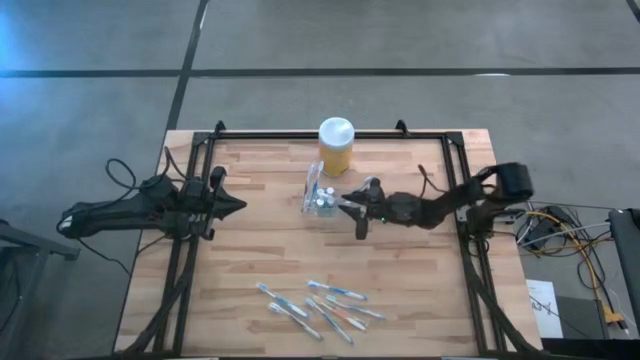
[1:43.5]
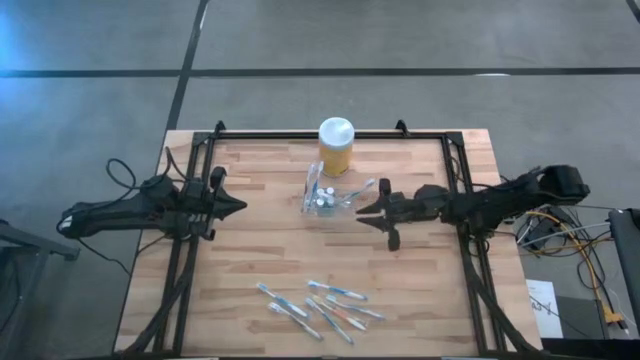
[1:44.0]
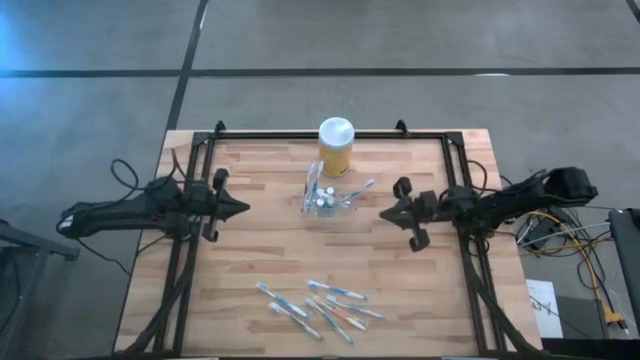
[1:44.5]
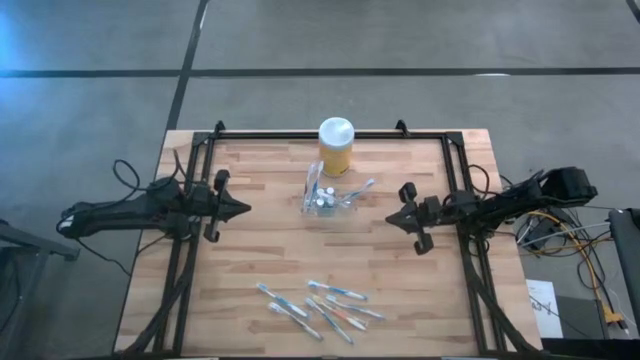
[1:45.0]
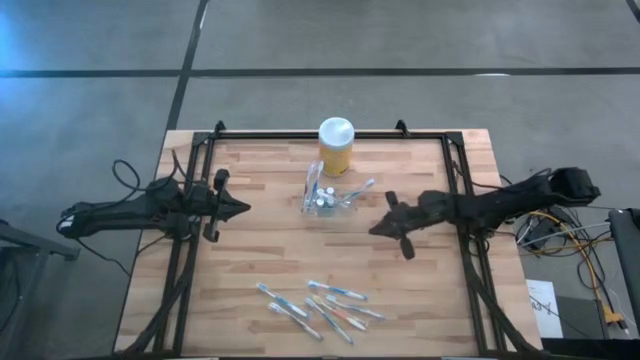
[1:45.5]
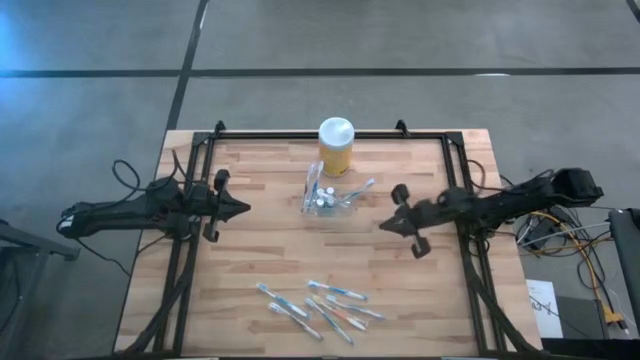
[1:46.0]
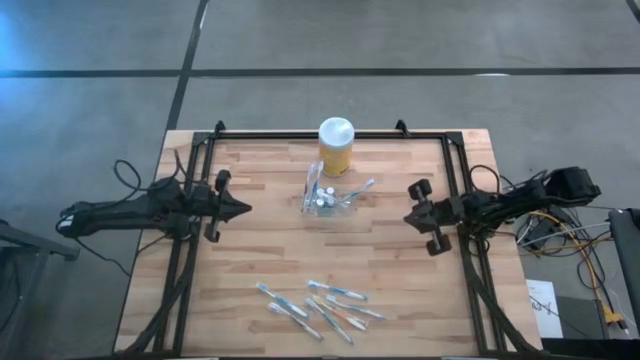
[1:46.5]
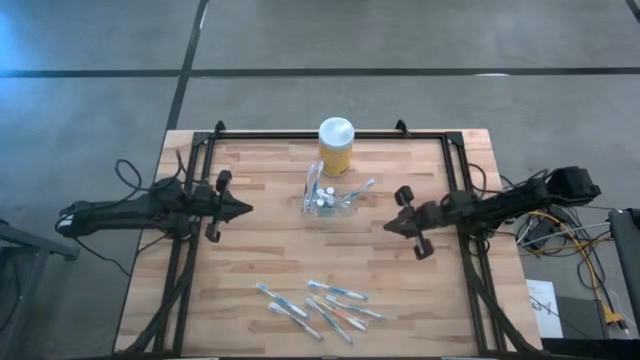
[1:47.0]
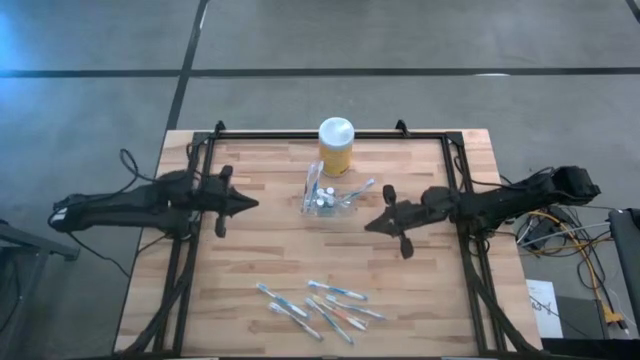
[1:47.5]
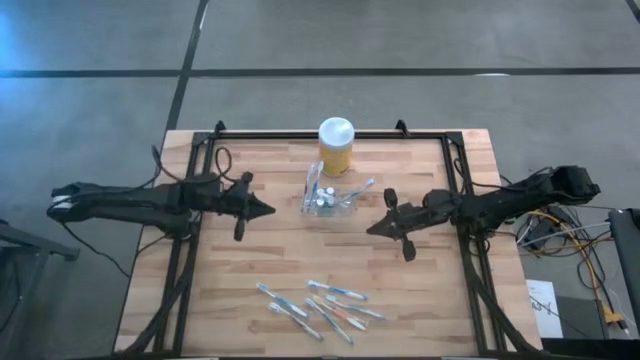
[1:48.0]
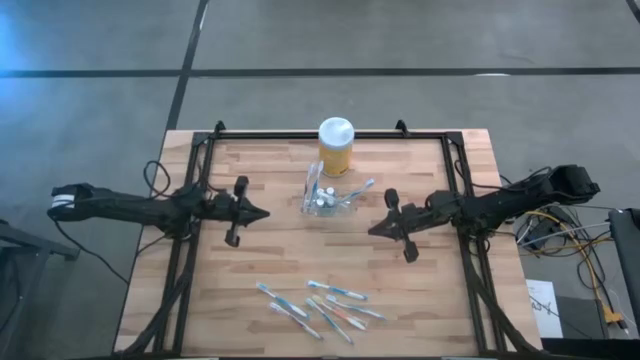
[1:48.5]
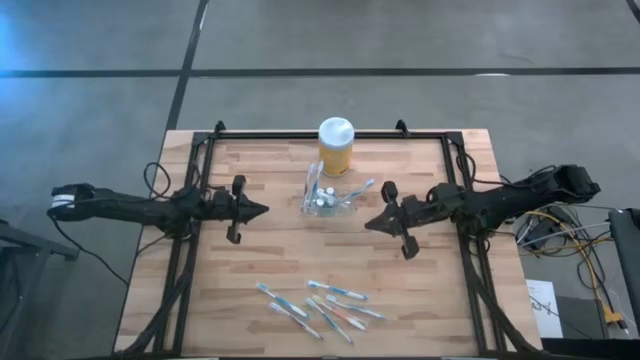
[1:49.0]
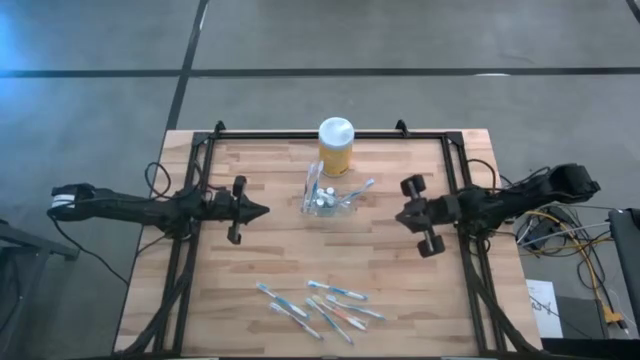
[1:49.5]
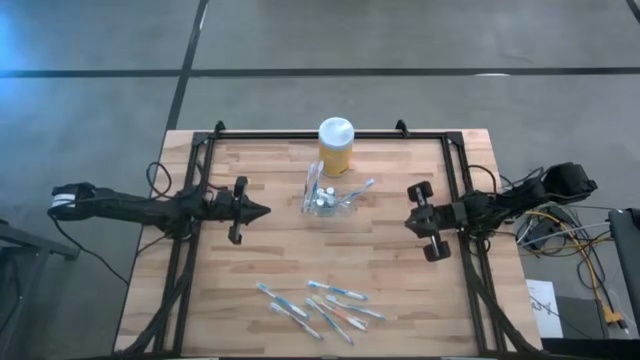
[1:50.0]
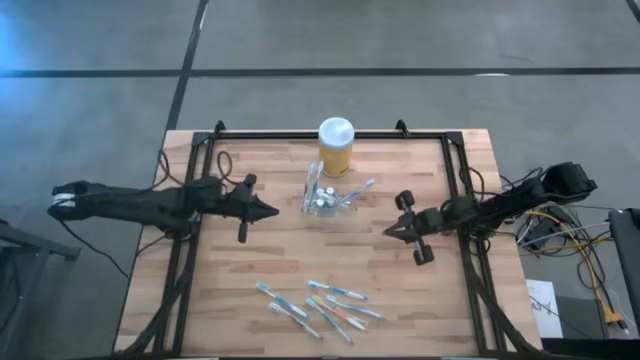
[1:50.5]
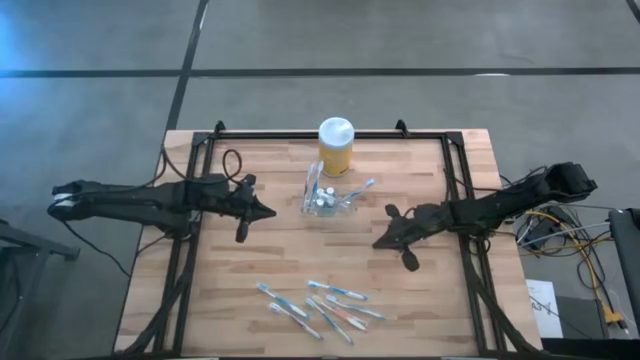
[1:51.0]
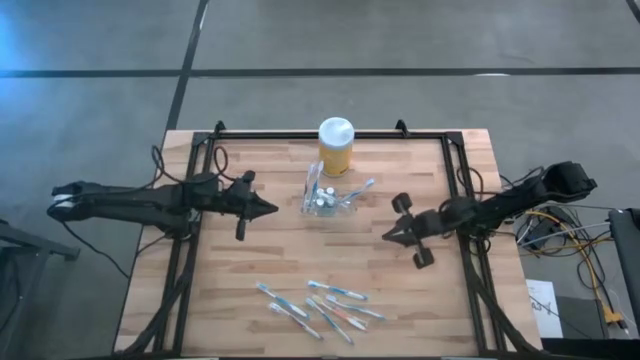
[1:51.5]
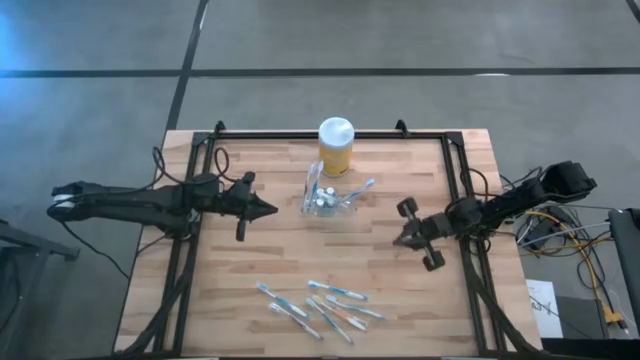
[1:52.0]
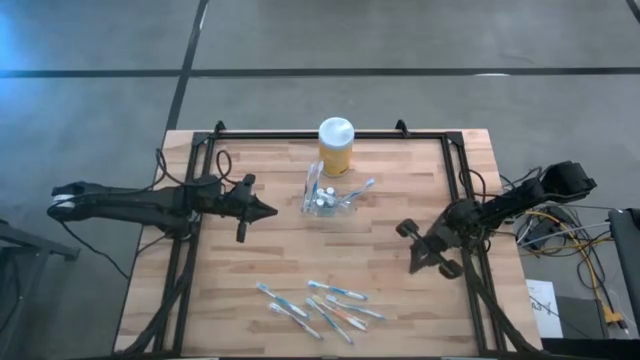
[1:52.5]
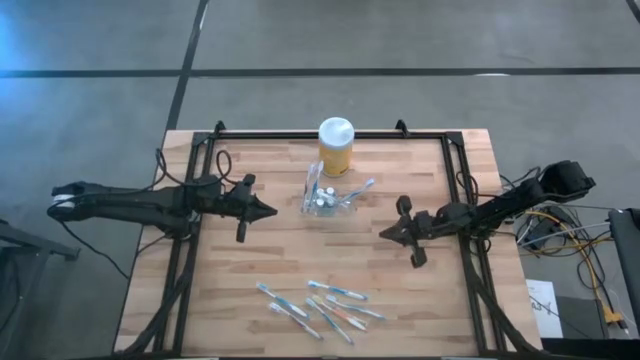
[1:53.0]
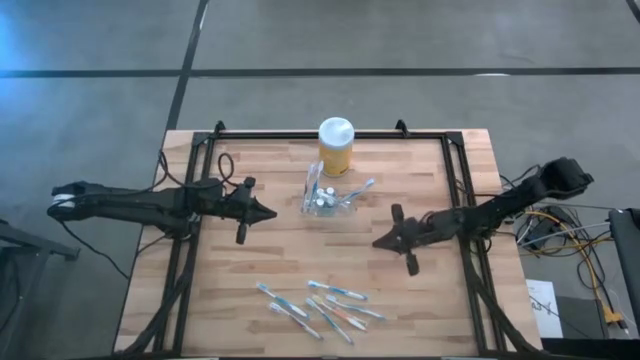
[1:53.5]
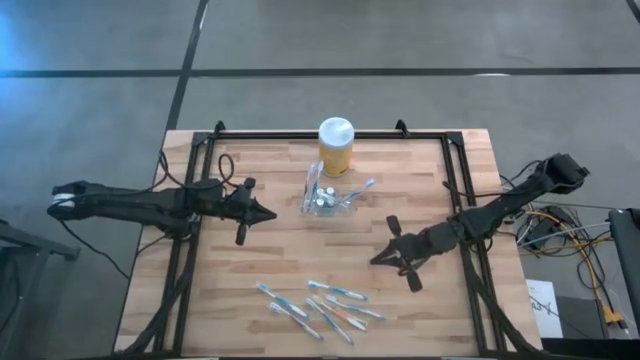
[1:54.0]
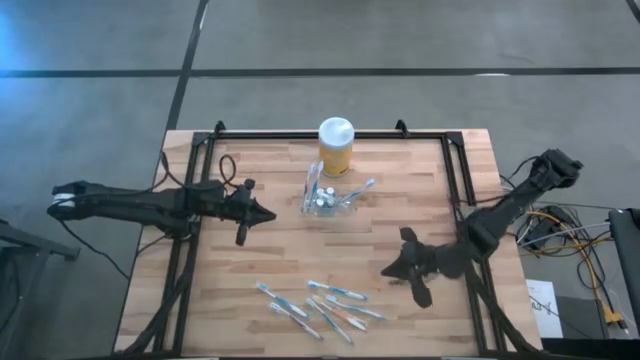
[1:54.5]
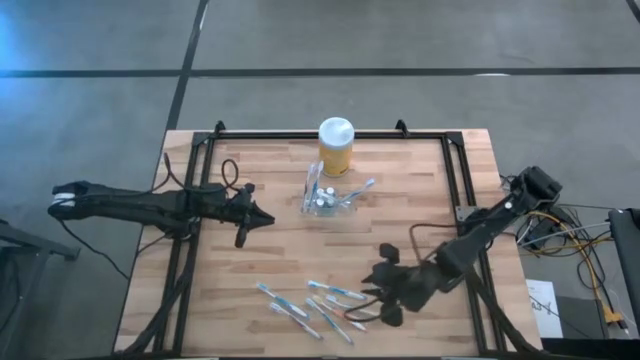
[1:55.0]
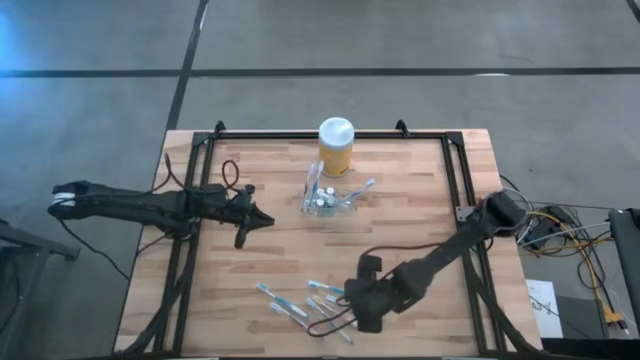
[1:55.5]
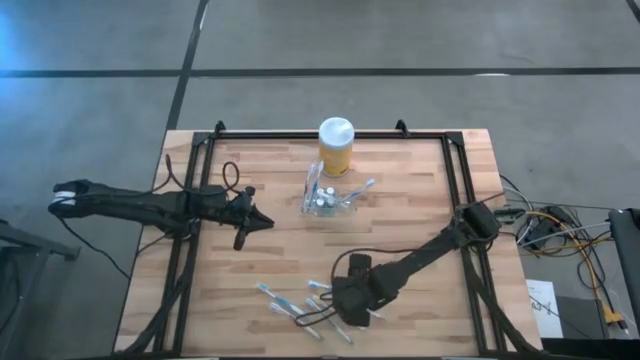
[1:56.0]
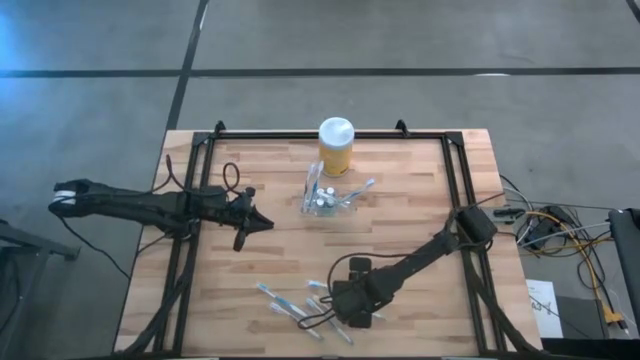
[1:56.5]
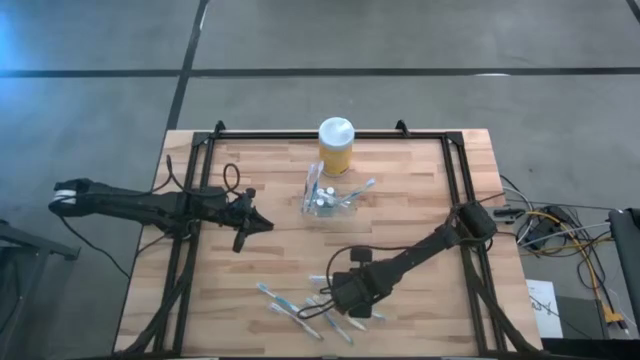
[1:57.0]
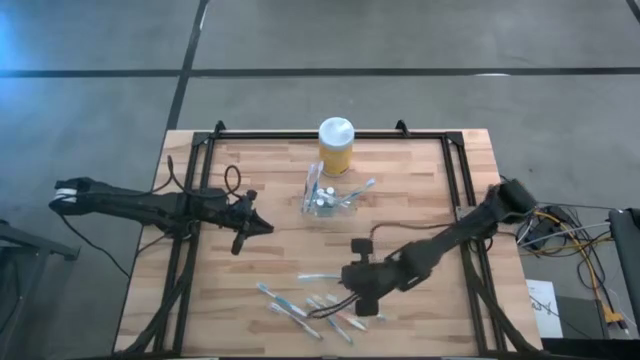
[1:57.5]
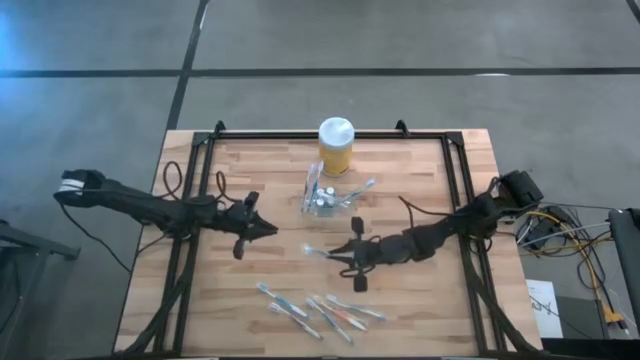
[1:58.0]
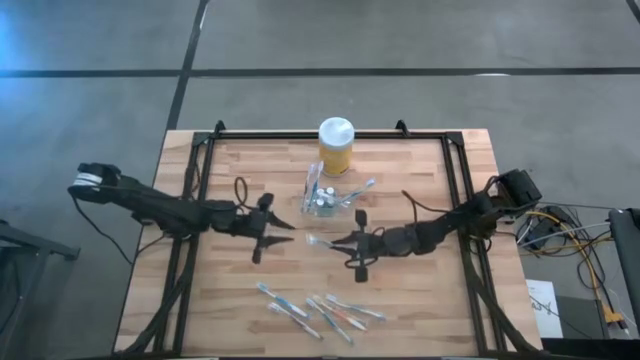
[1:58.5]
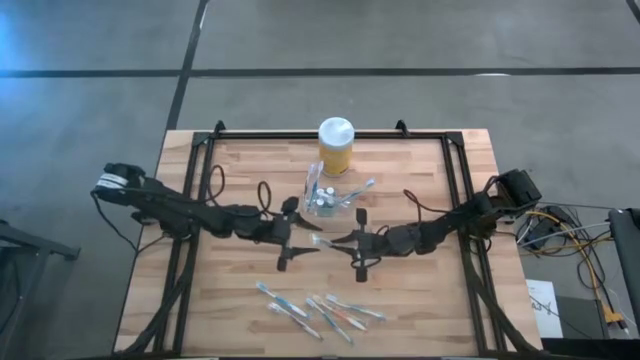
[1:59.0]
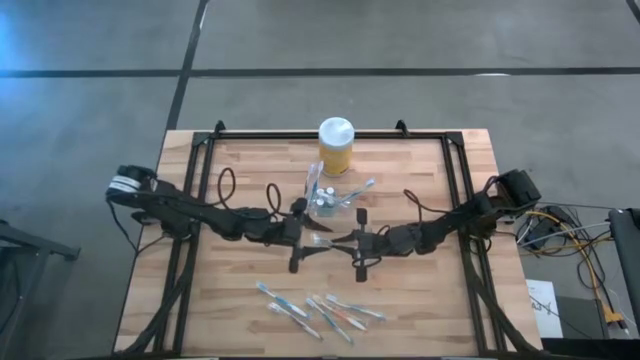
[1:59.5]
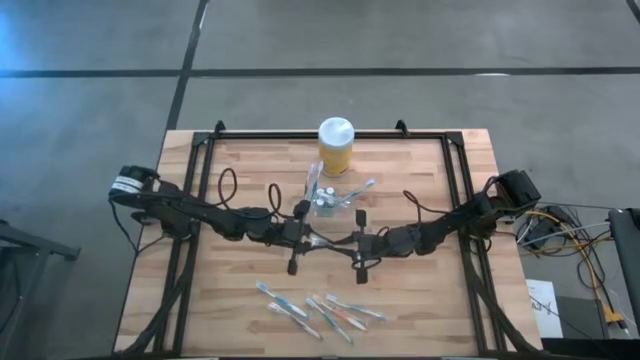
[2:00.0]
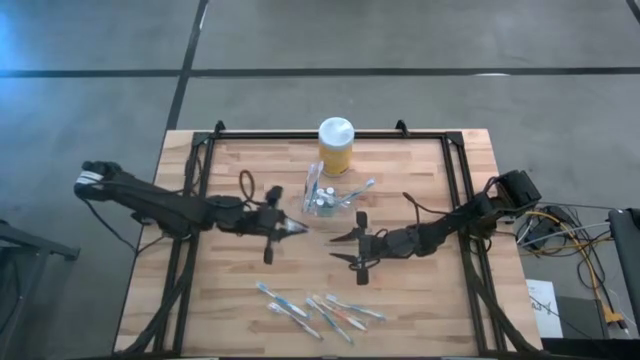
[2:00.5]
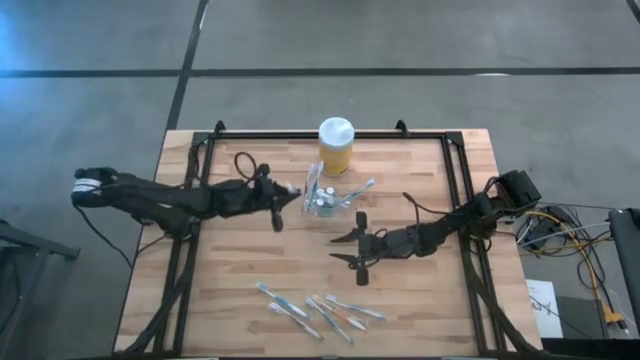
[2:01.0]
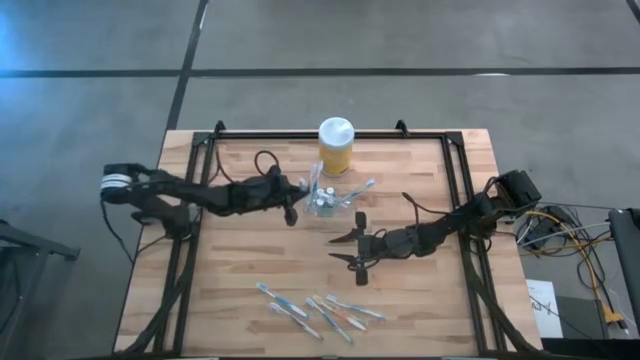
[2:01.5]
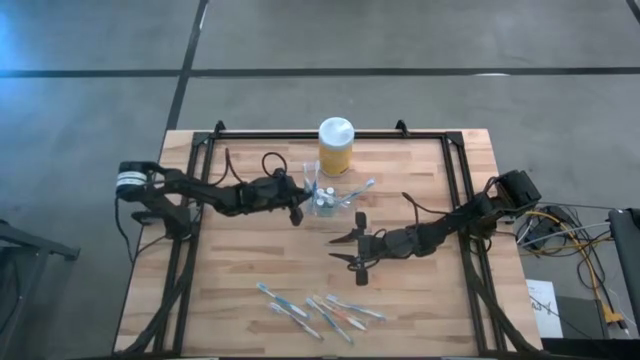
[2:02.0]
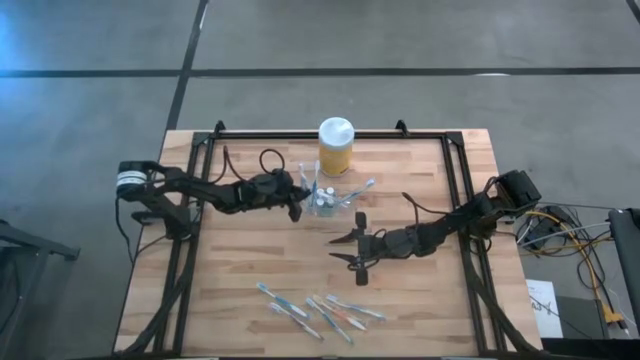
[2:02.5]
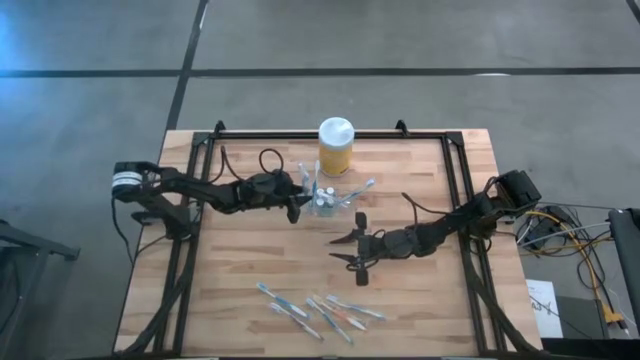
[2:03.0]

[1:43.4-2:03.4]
Task: Pick & Place toothbrushing station
Put the blue toothbrush into the transparent organizer

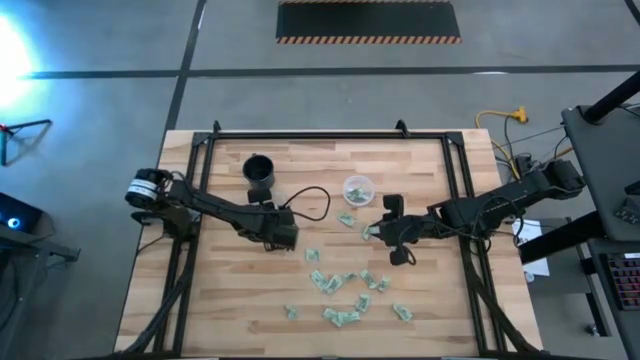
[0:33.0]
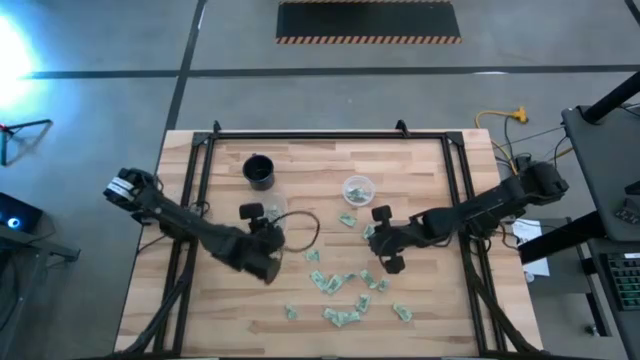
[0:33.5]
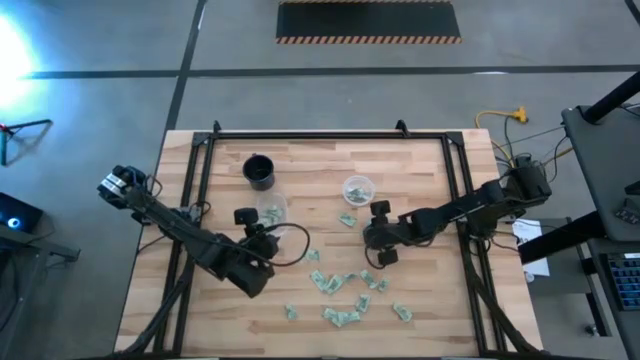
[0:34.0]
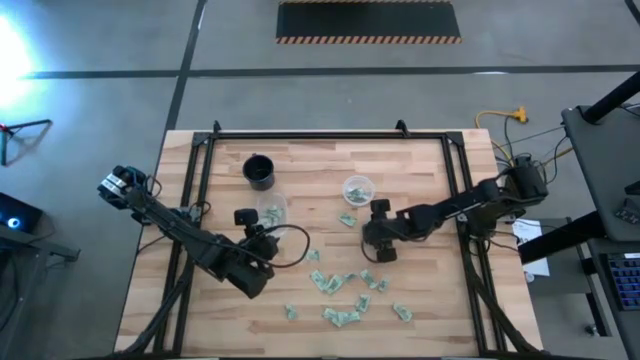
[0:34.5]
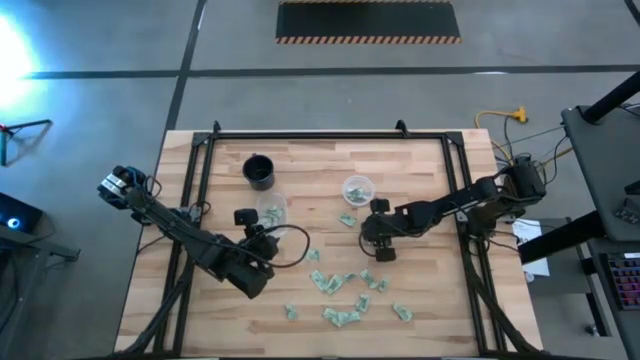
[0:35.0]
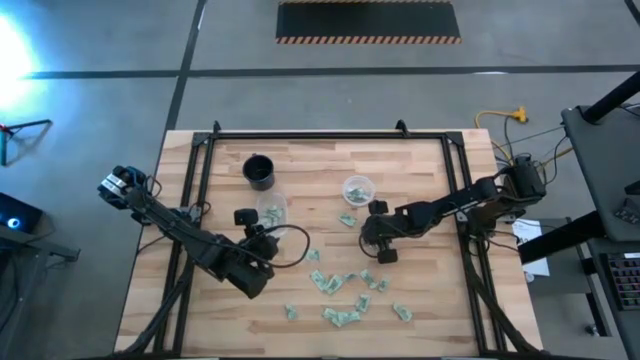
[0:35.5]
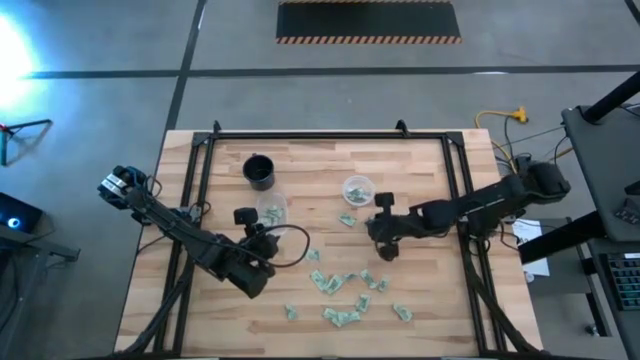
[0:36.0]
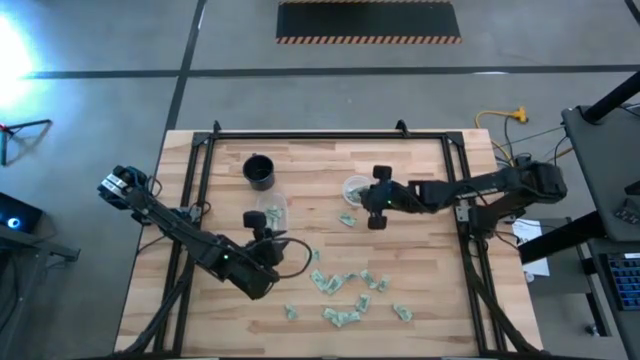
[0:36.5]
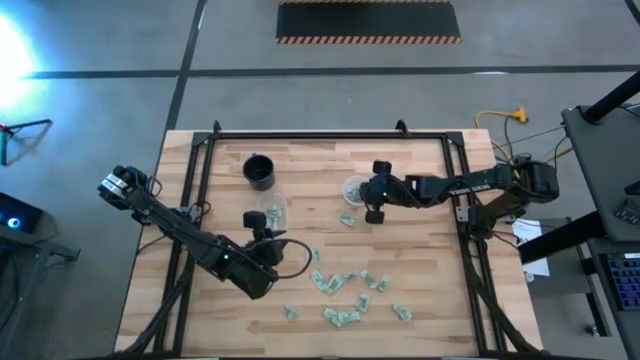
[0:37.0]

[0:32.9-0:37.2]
Task: Pick and place items into bin
Put the stevia packet into the right transparent bin
